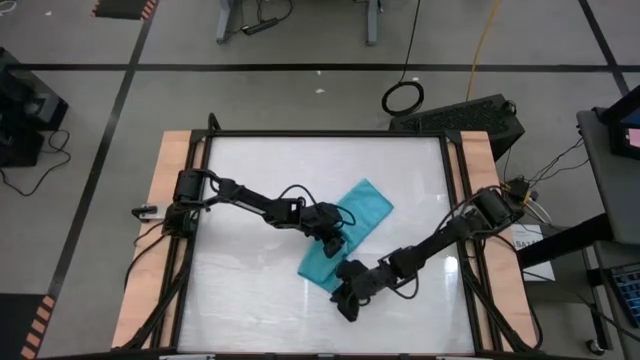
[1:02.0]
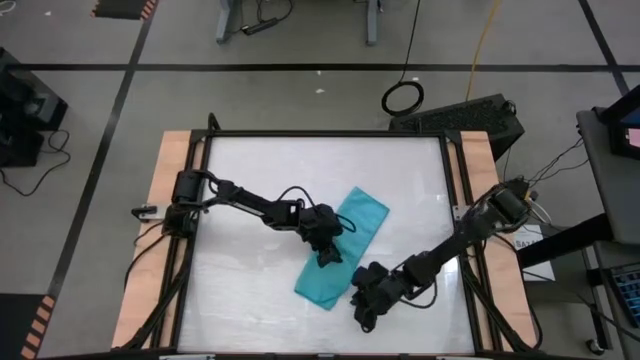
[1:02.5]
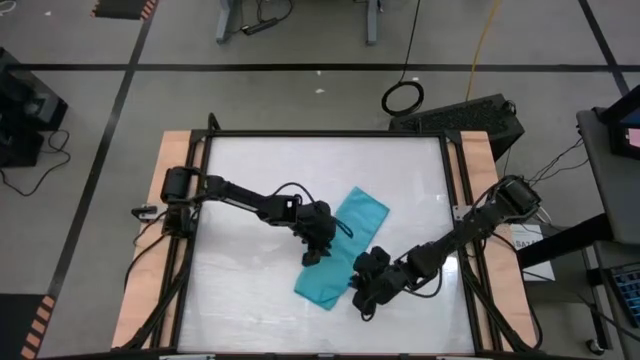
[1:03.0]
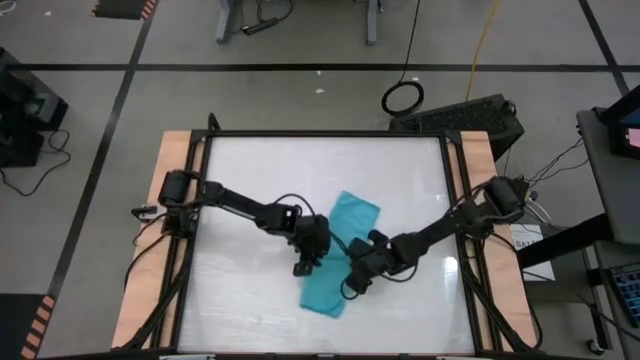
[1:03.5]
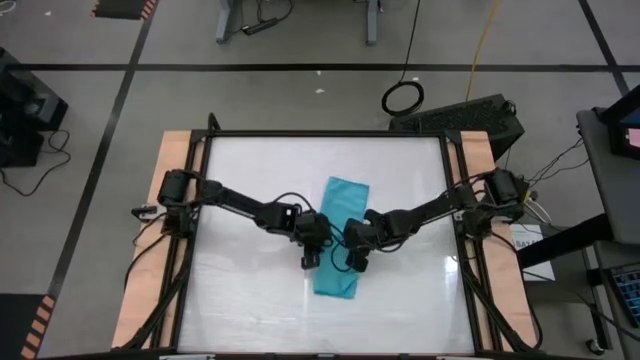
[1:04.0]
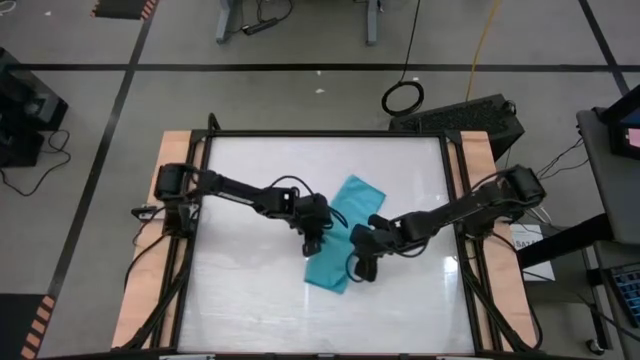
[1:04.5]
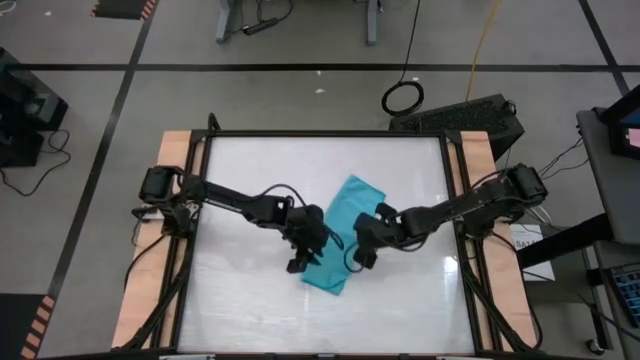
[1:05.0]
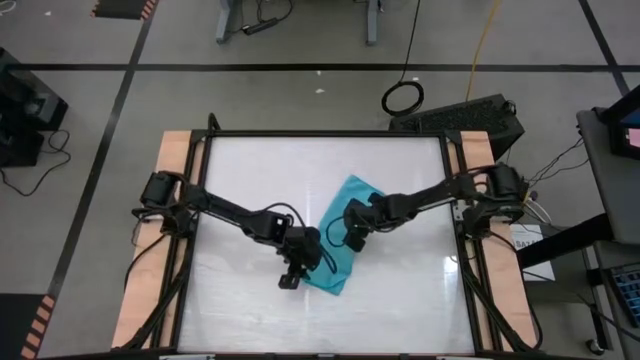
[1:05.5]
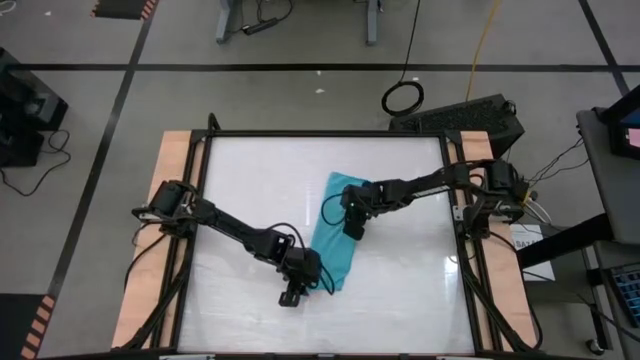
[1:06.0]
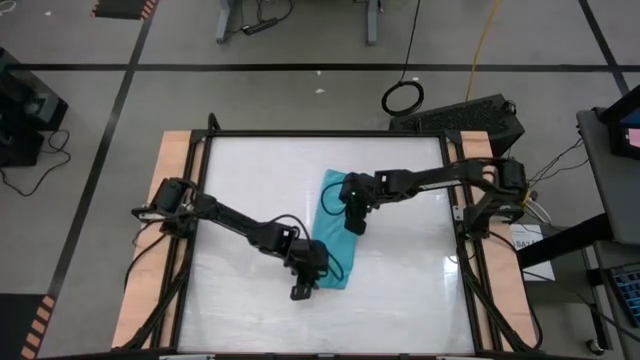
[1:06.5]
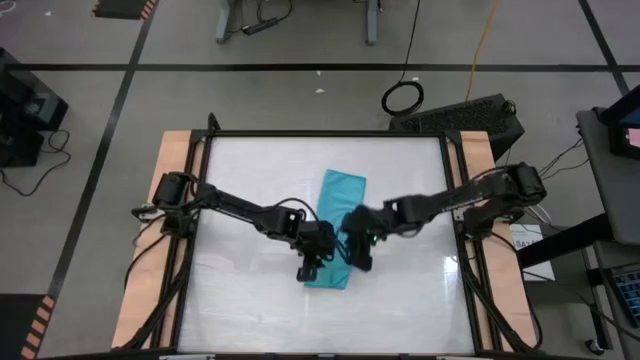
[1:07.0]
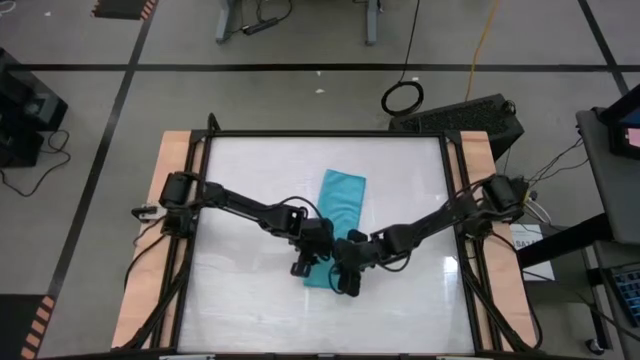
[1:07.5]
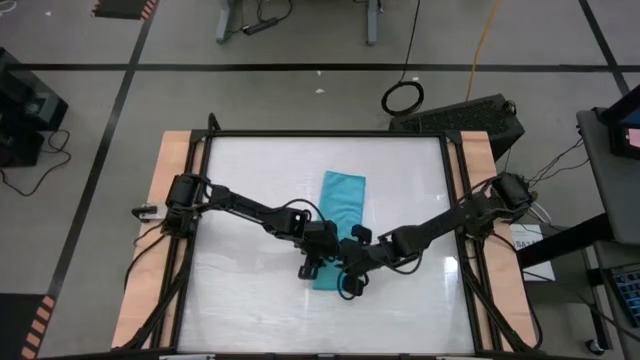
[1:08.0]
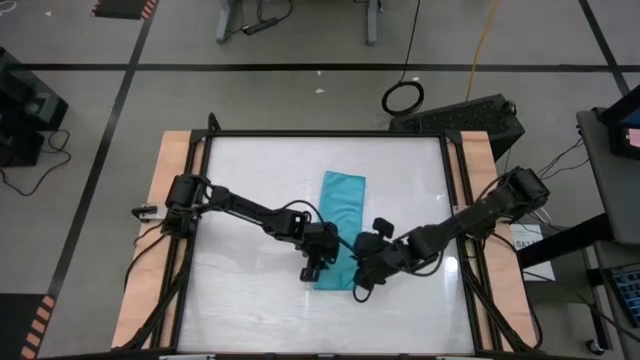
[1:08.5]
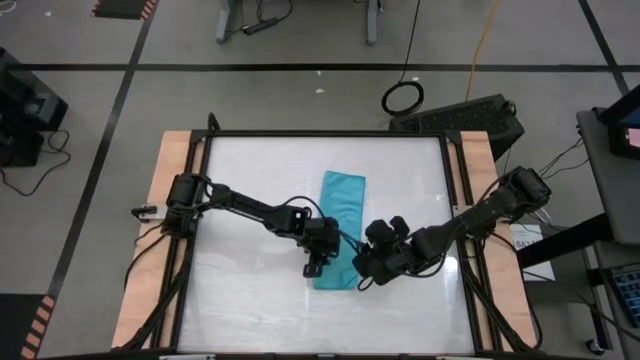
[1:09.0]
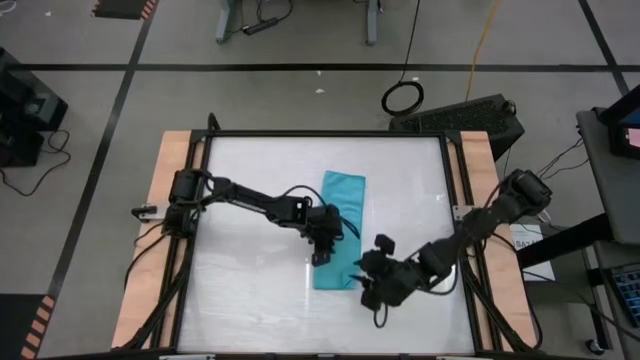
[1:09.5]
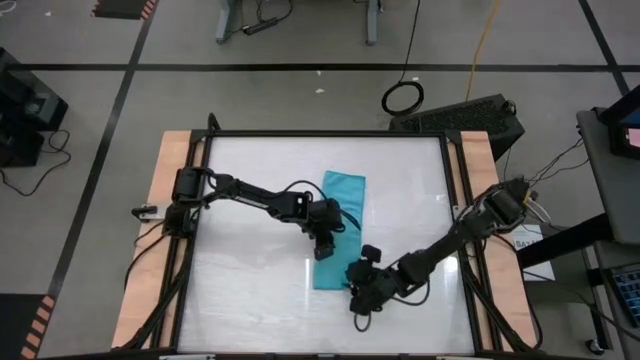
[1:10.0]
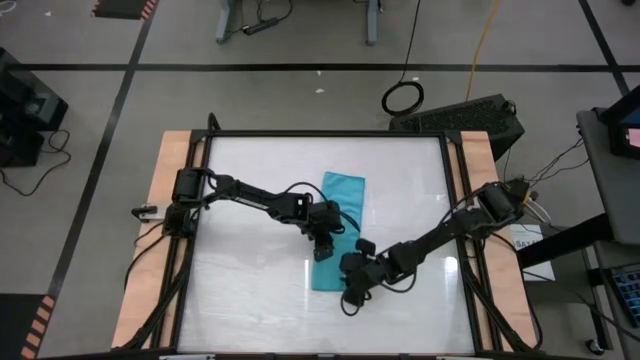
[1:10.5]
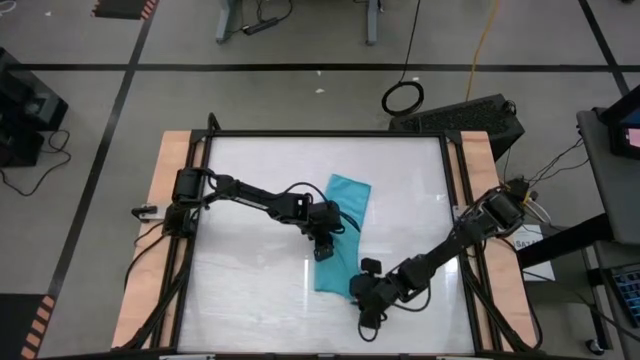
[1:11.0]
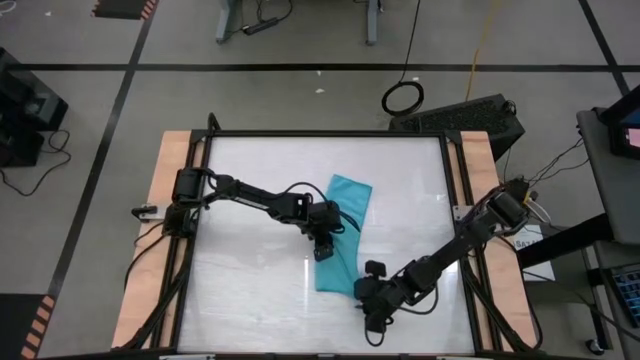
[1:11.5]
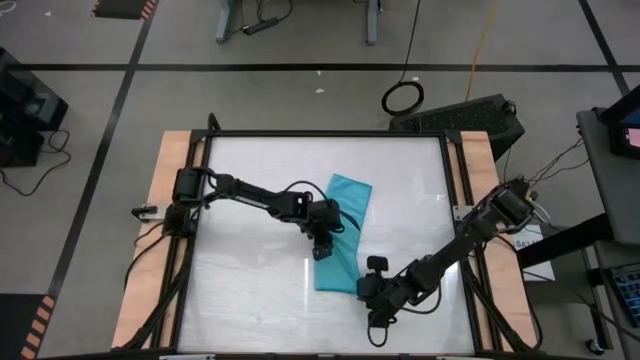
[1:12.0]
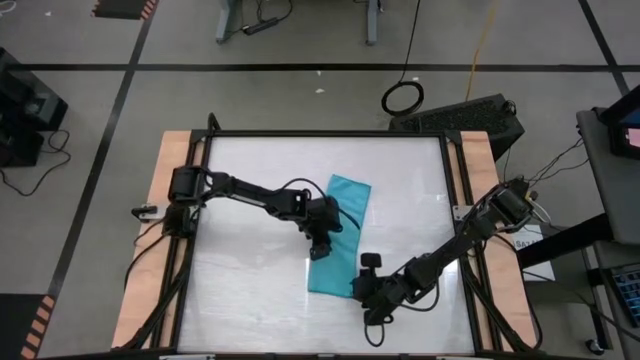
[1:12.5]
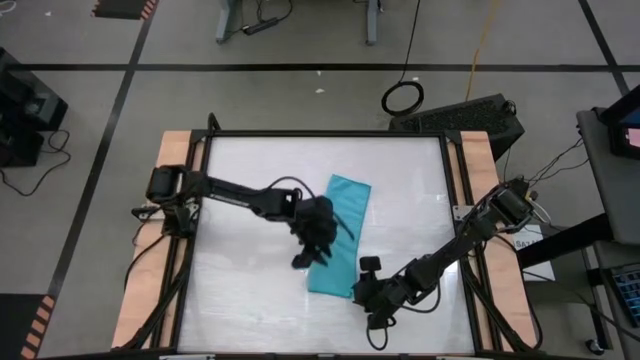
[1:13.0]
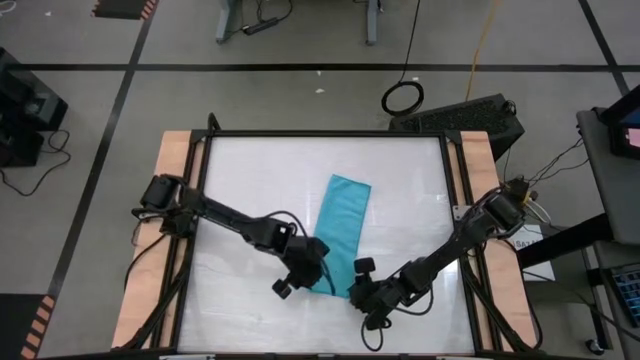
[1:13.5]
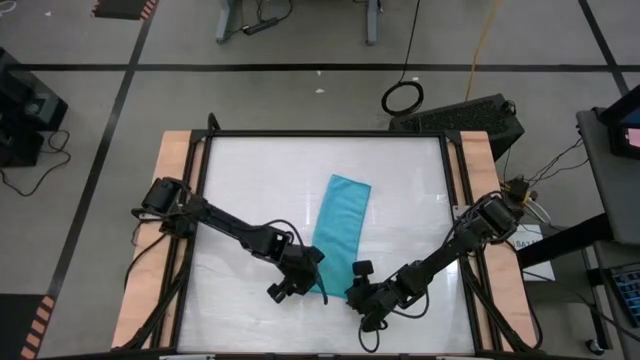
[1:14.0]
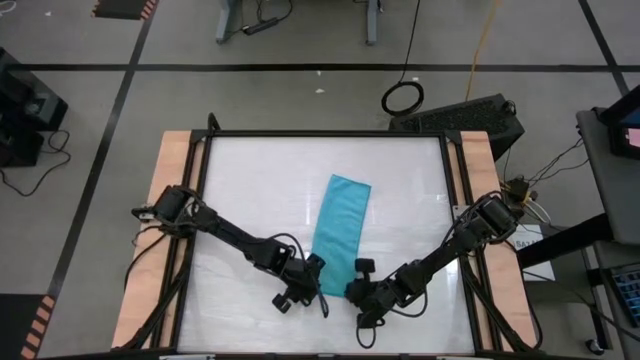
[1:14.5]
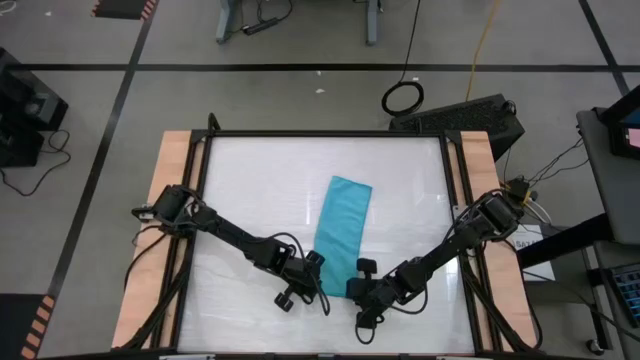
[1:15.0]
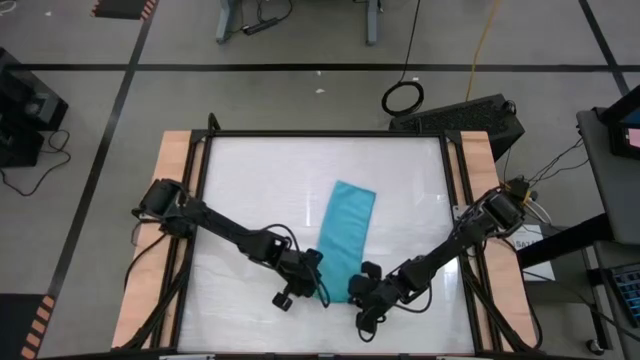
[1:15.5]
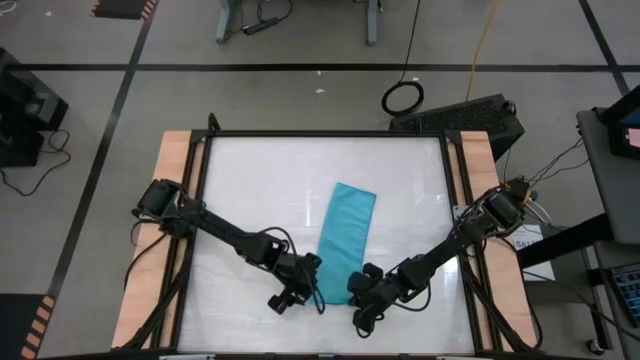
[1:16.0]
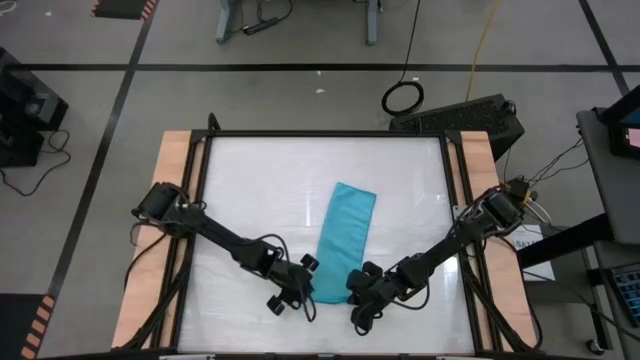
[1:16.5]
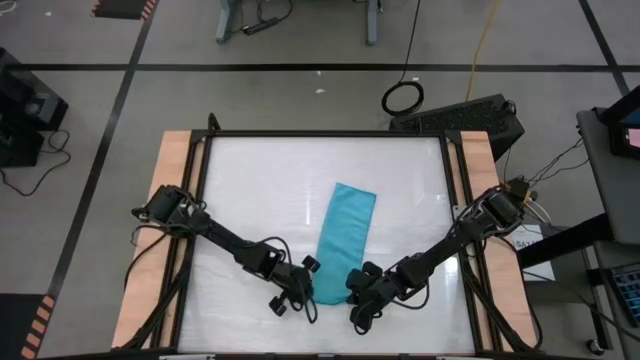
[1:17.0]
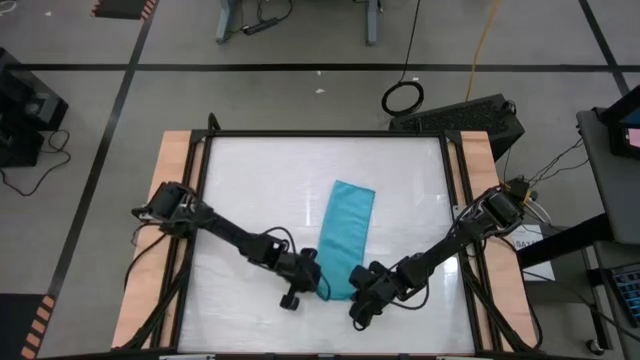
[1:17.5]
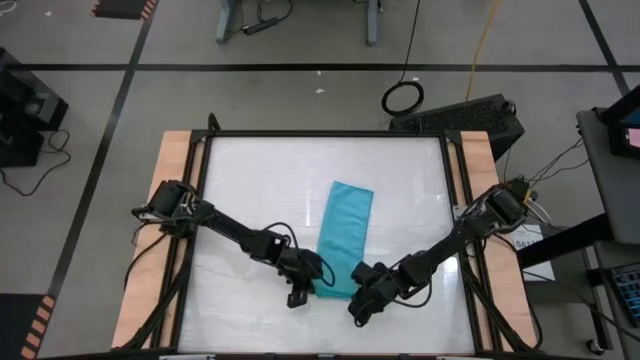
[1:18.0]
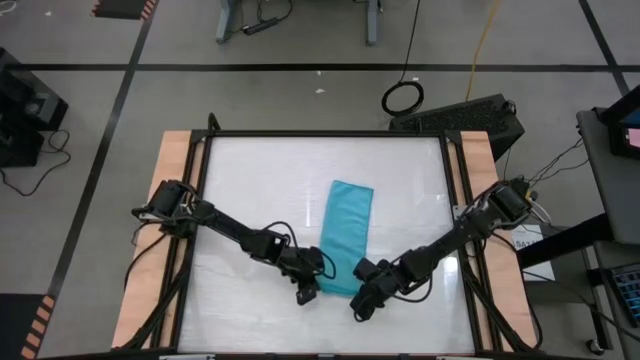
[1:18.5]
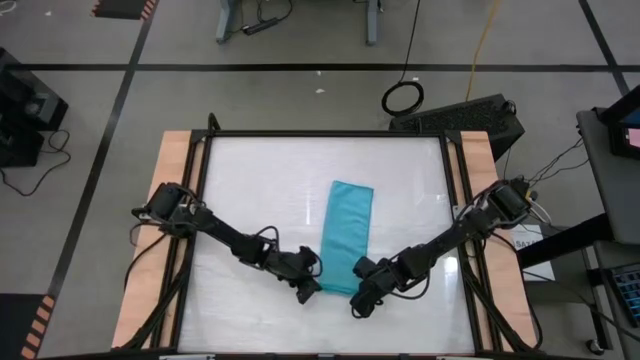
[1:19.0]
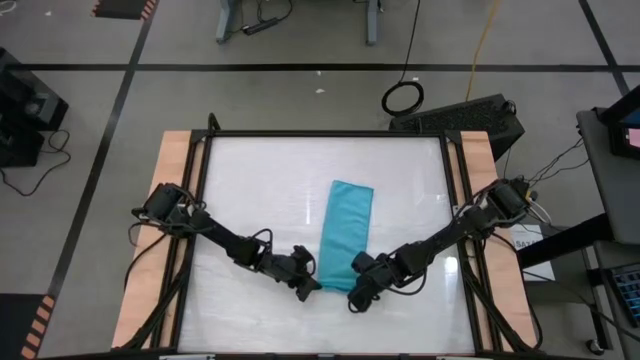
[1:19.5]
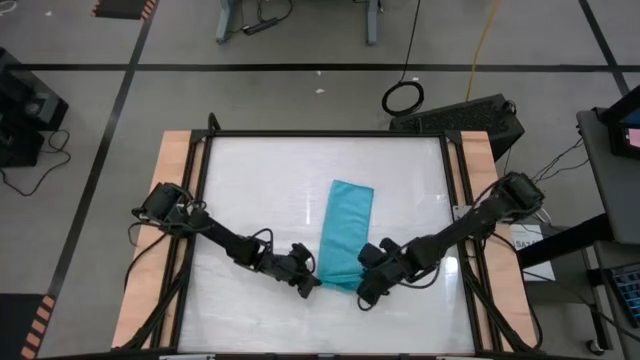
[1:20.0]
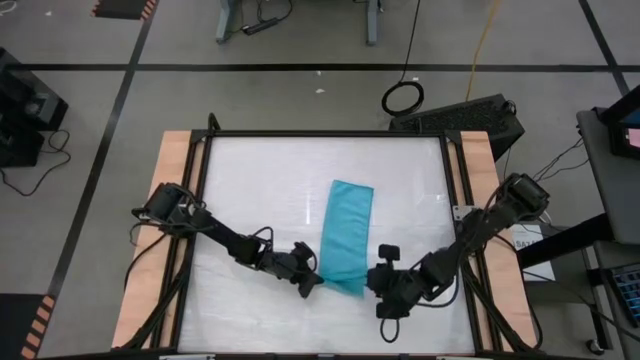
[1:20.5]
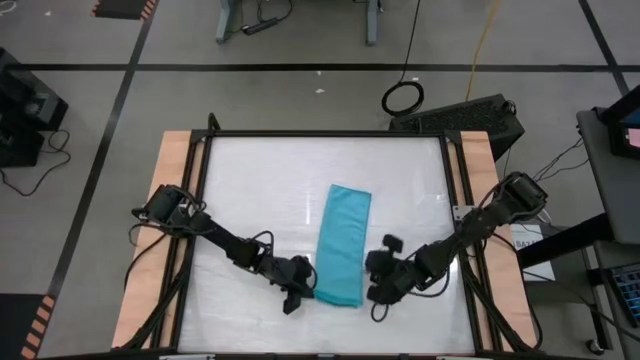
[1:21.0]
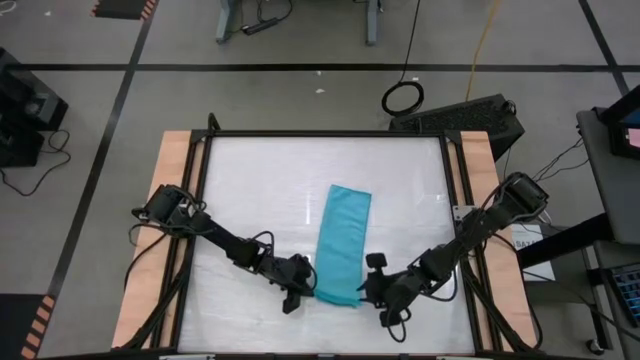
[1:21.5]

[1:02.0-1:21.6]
Task: Roll towel
Roll the blue microfiber towel

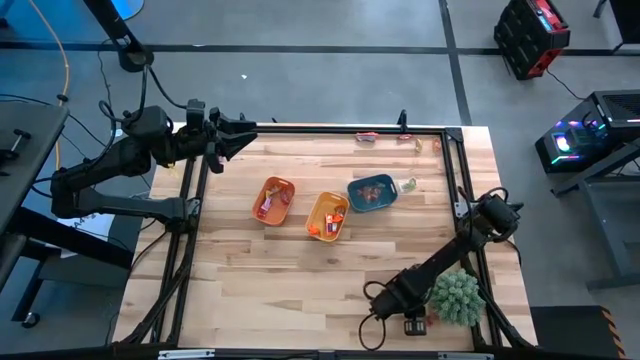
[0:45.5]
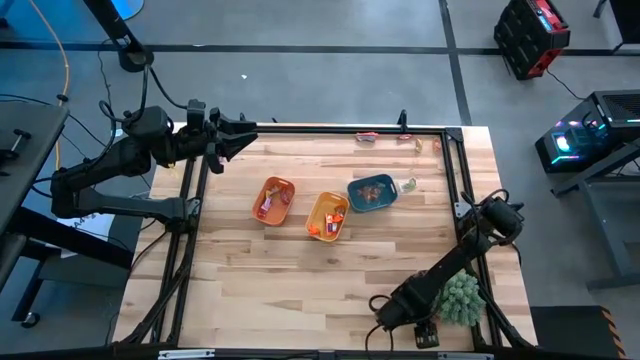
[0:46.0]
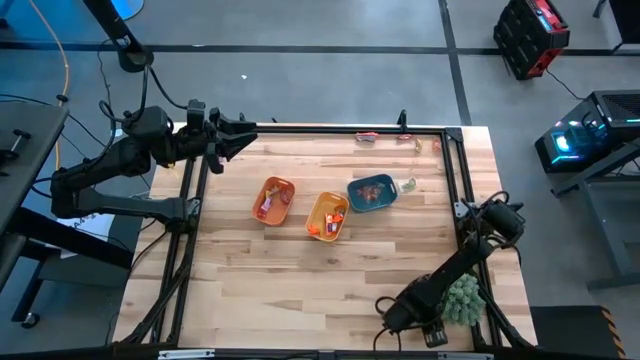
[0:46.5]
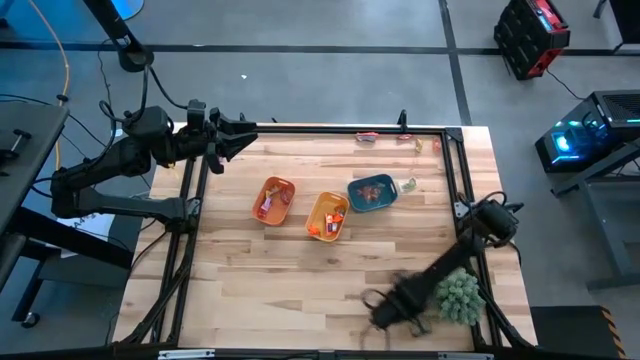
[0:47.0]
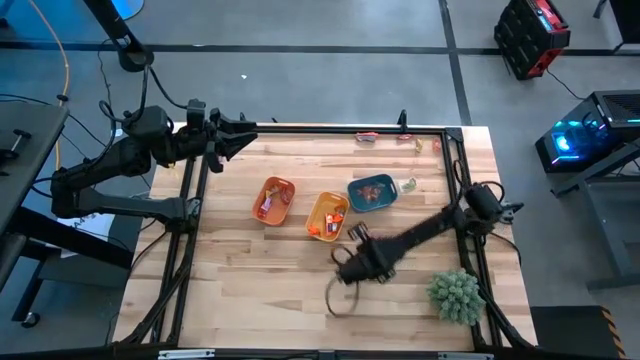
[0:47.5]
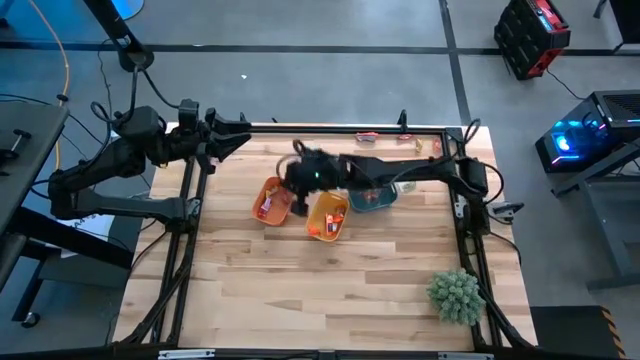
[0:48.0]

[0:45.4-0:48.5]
Task: Sort candy
Put the red candy into the orange bin
